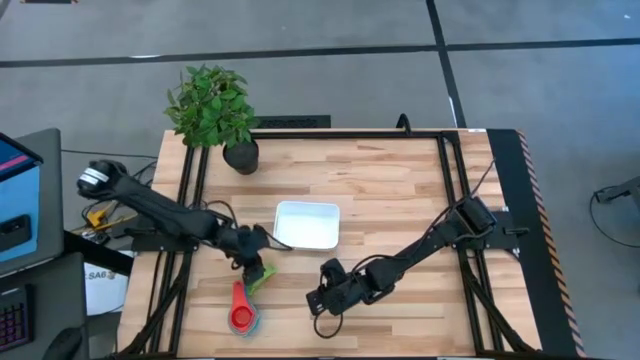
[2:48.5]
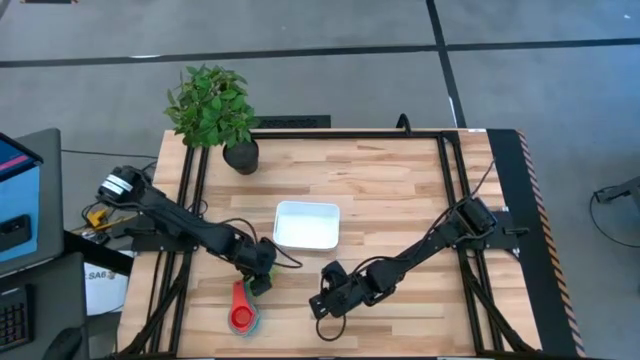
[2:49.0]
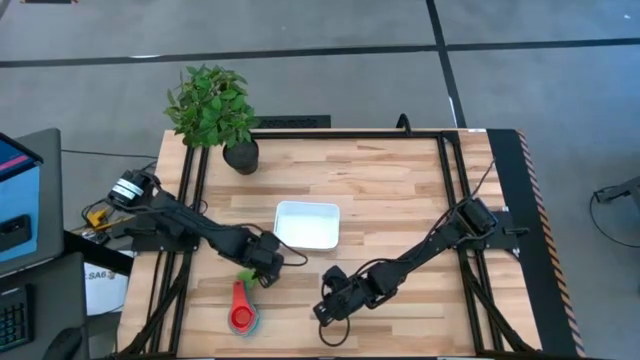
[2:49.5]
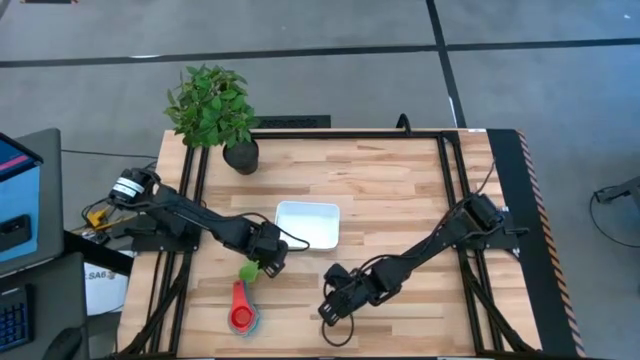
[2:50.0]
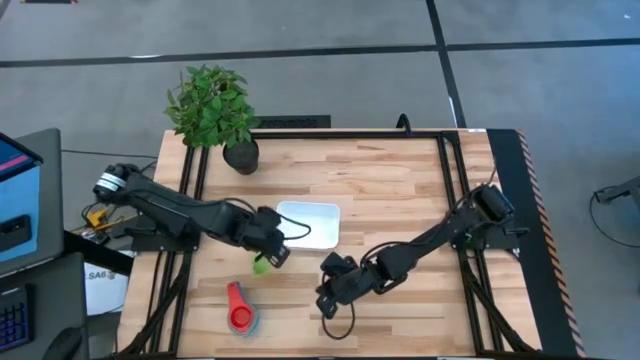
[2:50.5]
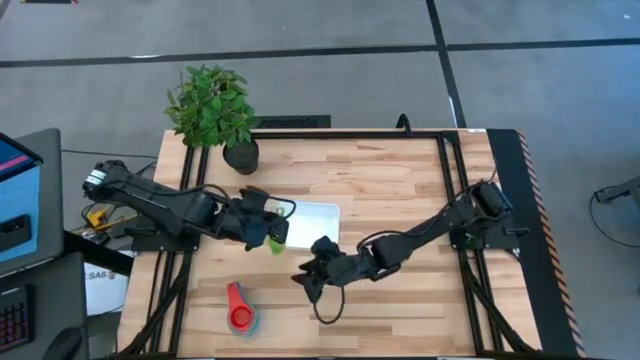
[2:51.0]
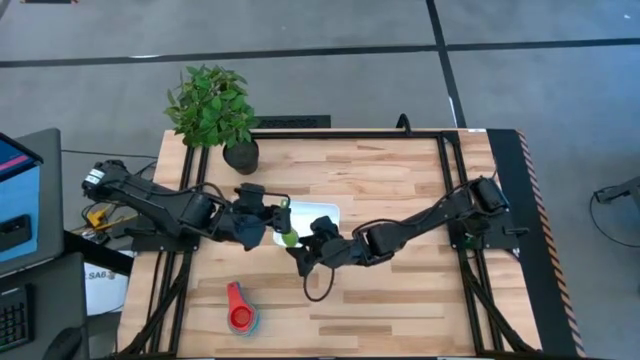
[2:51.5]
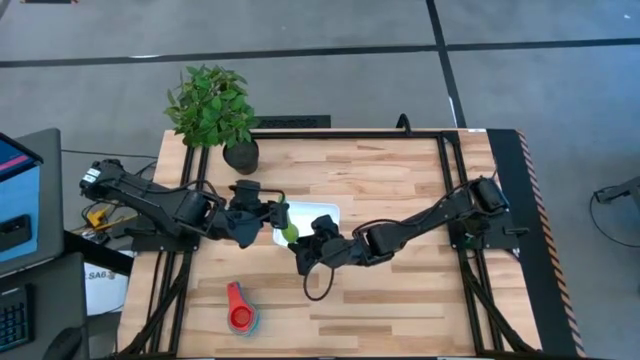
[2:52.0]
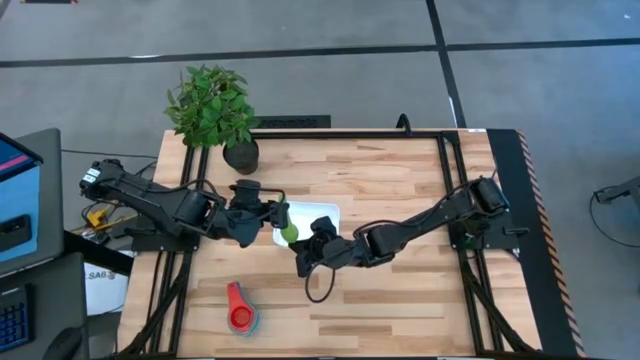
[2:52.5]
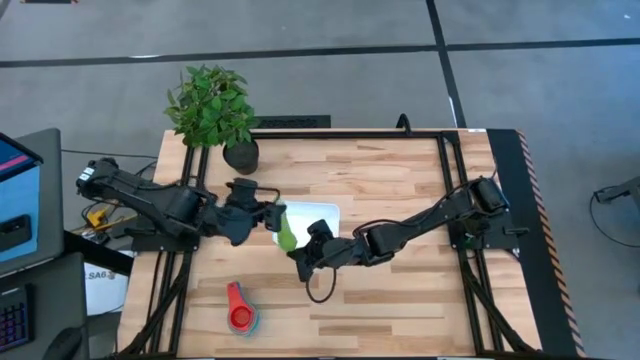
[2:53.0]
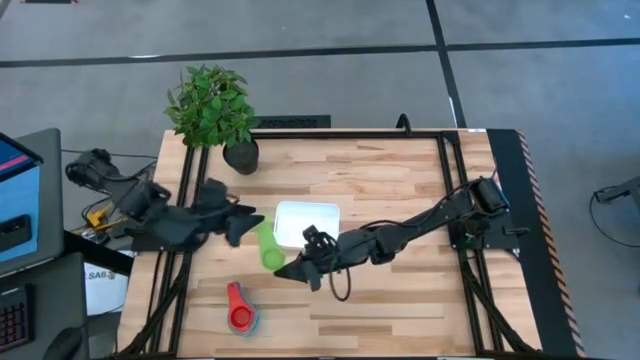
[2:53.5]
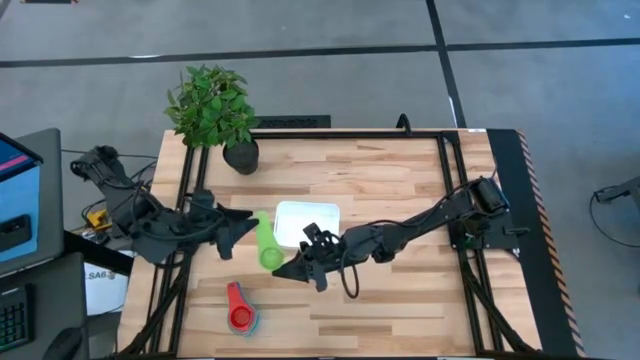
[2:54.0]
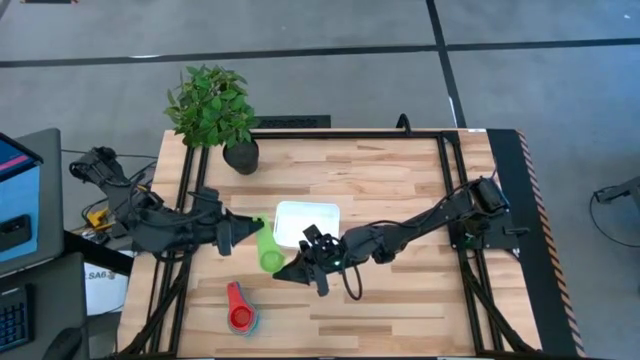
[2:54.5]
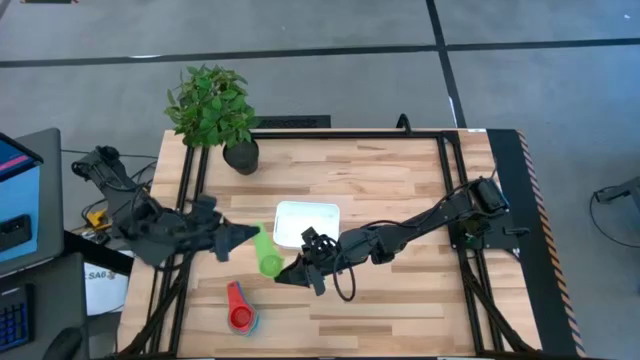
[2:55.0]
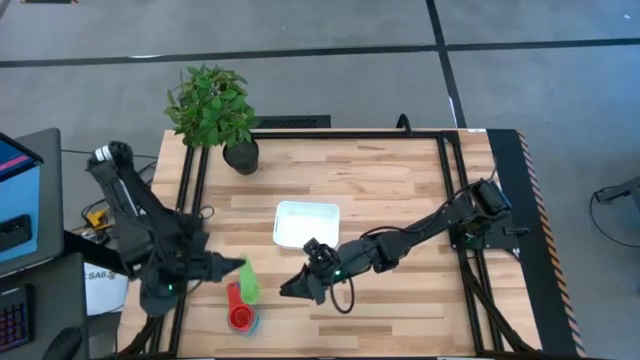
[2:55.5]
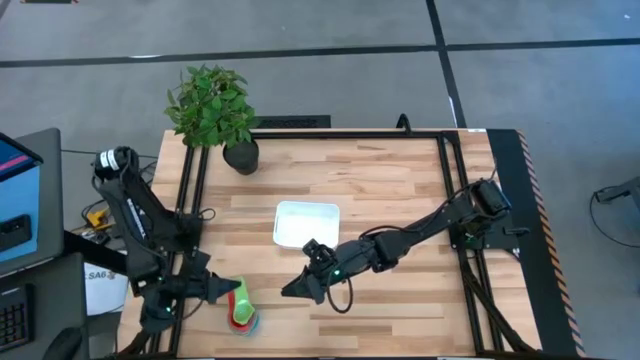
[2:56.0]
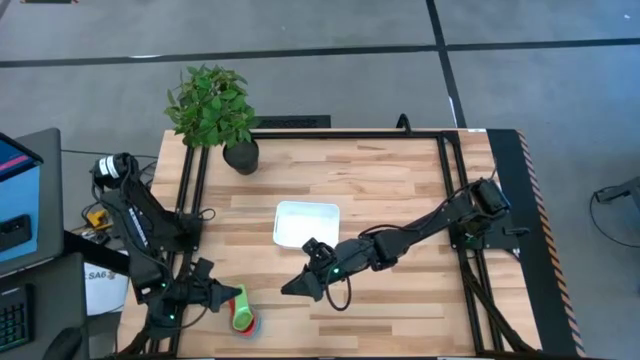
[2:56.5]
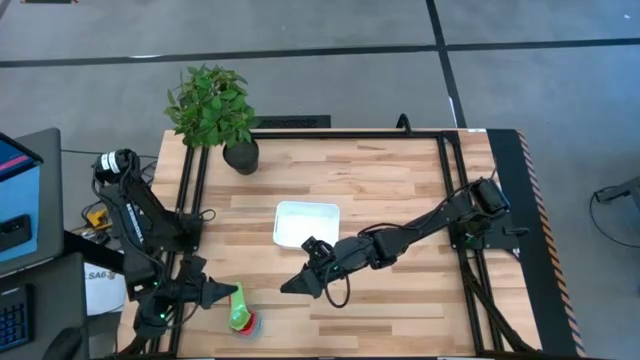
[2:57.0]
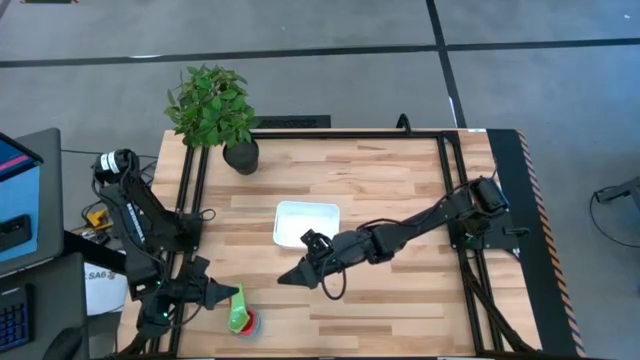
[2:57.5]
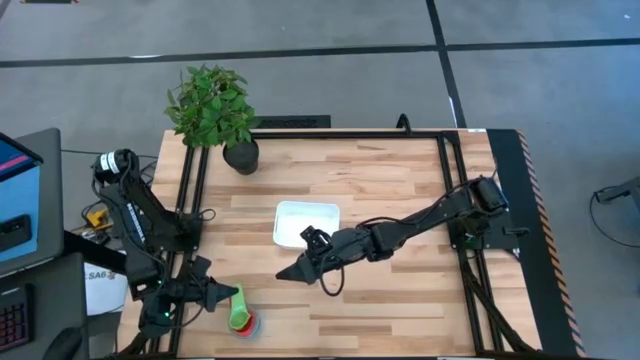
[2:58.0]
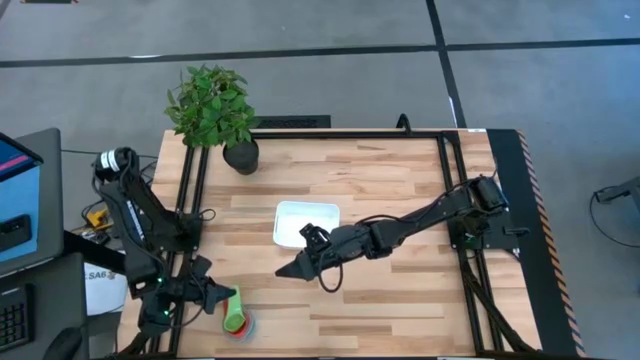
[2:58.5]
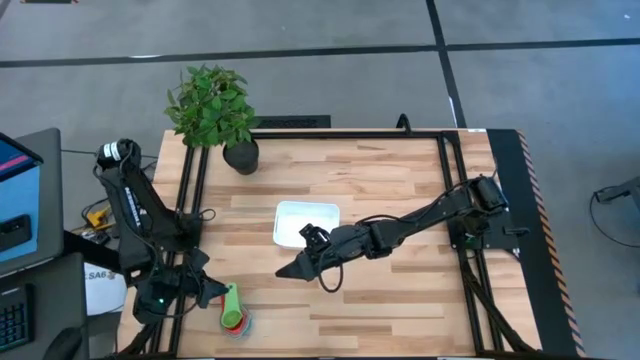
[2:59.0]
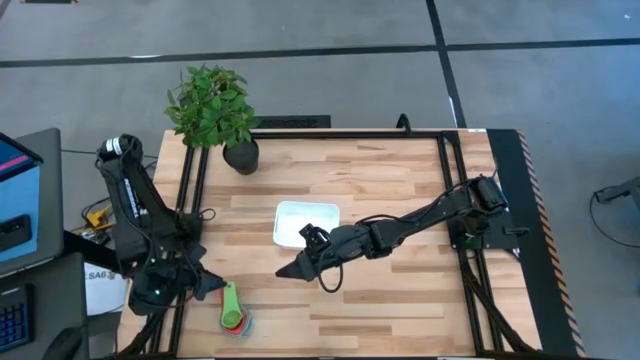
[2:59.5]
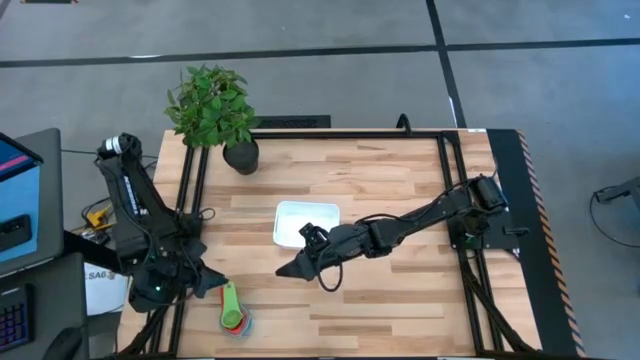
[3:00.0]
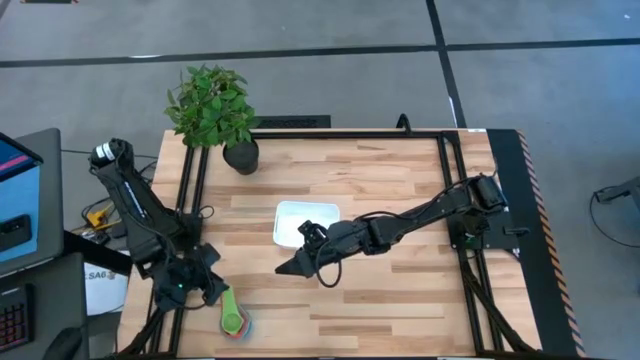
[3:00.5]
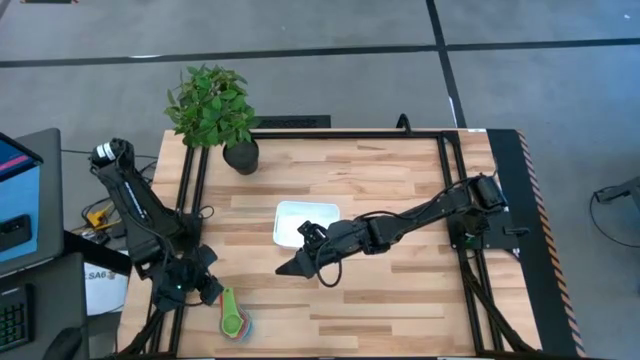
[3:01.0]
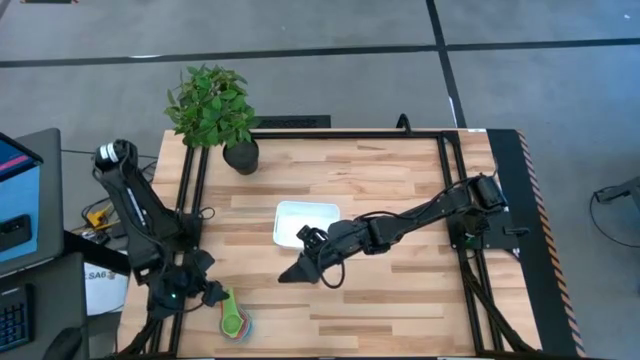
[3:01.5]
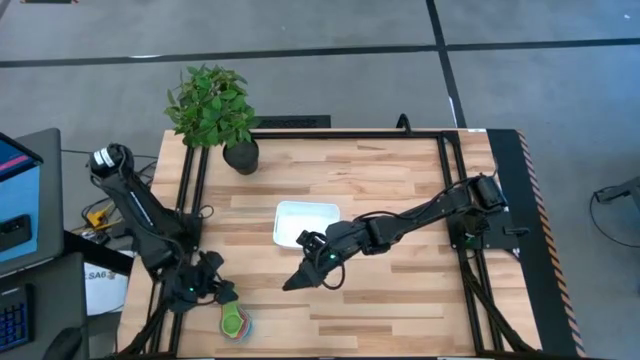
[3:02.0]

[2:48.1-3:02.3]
Task: Nest measuring cups in basket
Stack the green measuring cup into the red measuring cup

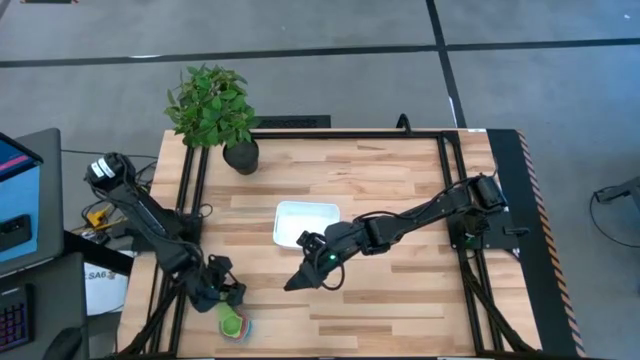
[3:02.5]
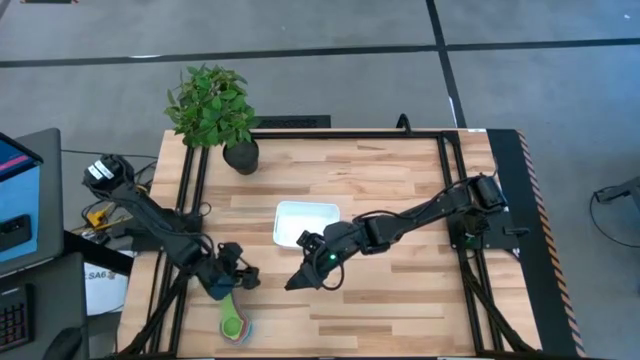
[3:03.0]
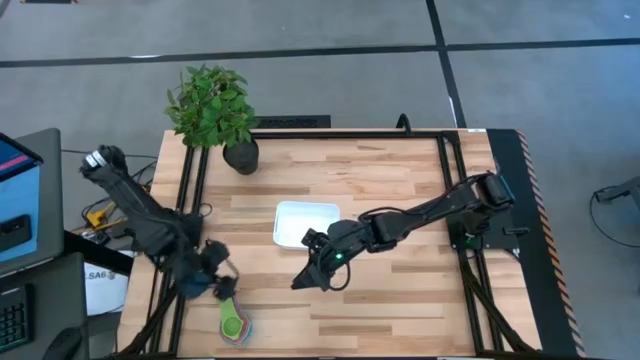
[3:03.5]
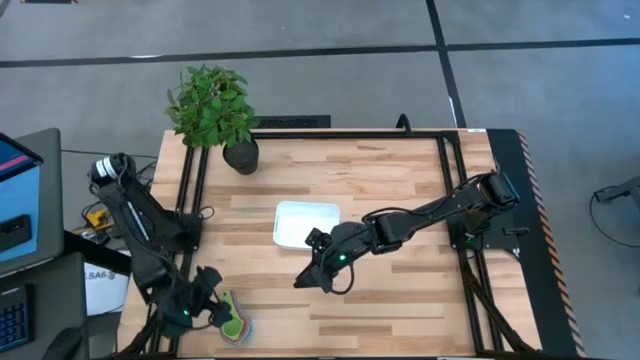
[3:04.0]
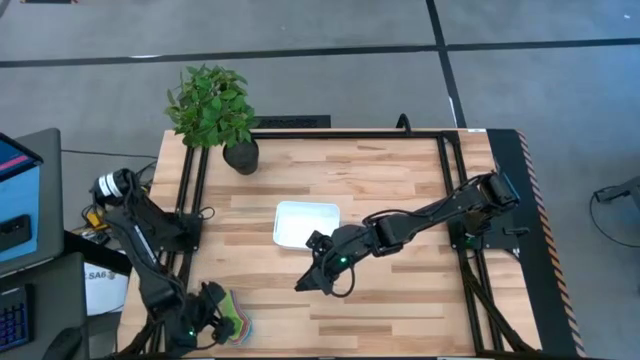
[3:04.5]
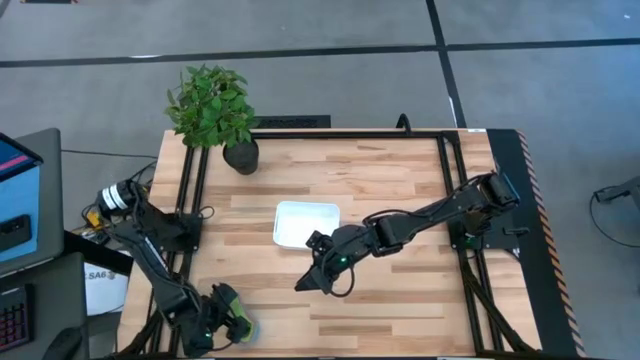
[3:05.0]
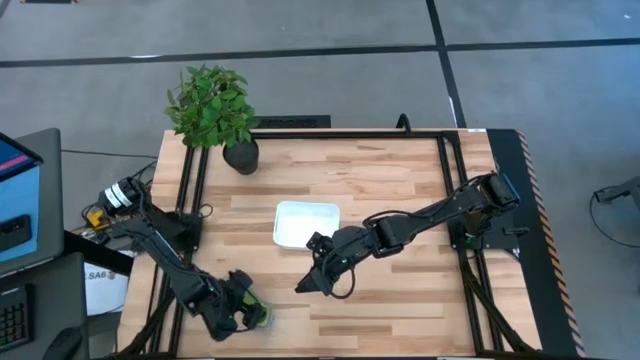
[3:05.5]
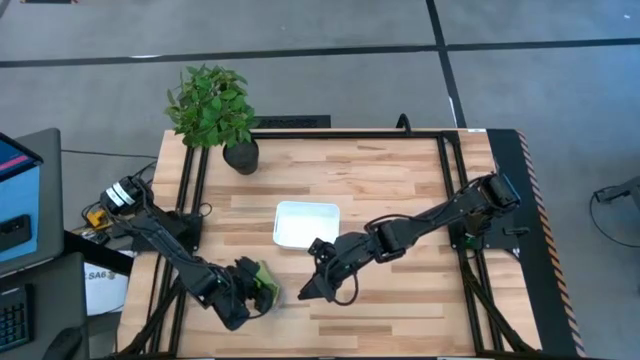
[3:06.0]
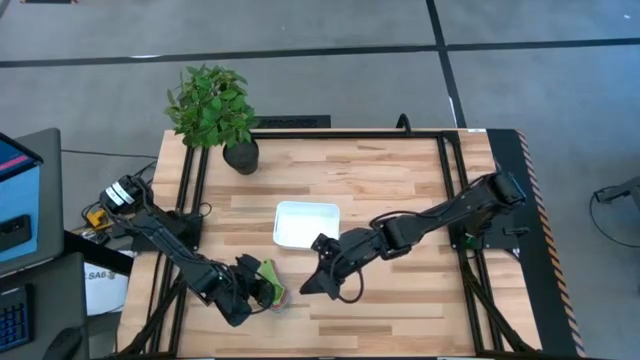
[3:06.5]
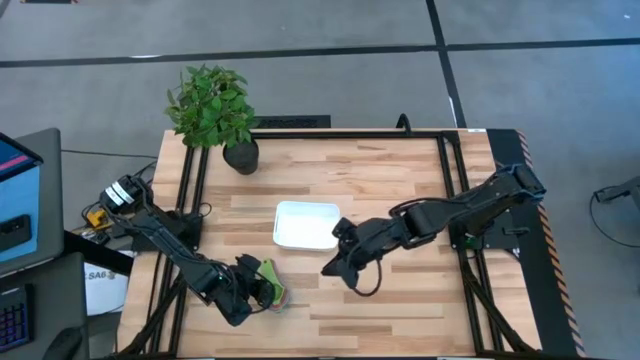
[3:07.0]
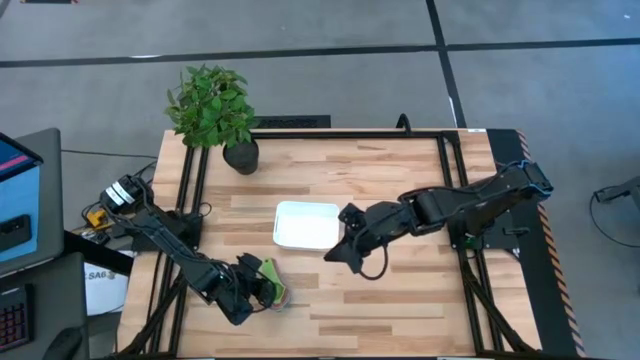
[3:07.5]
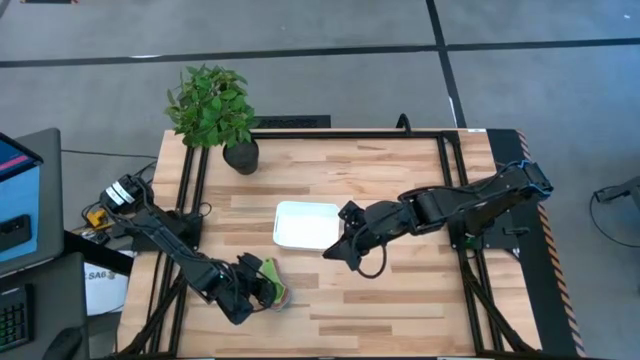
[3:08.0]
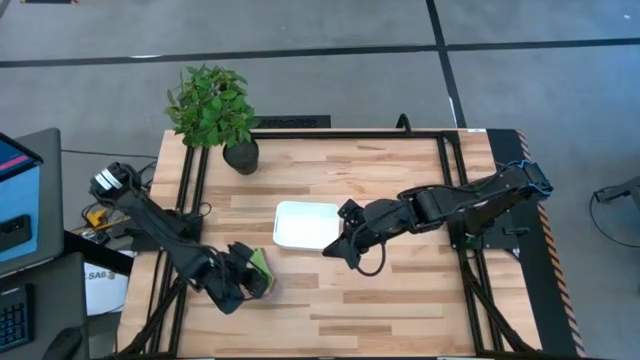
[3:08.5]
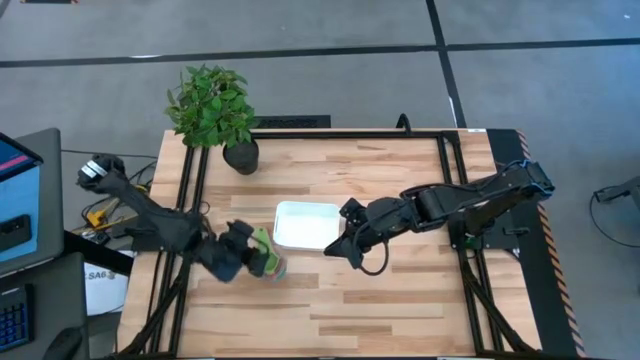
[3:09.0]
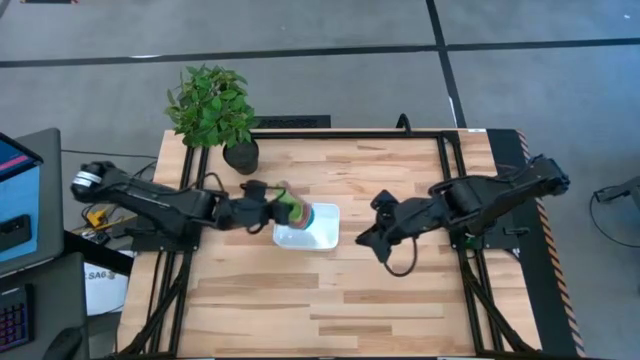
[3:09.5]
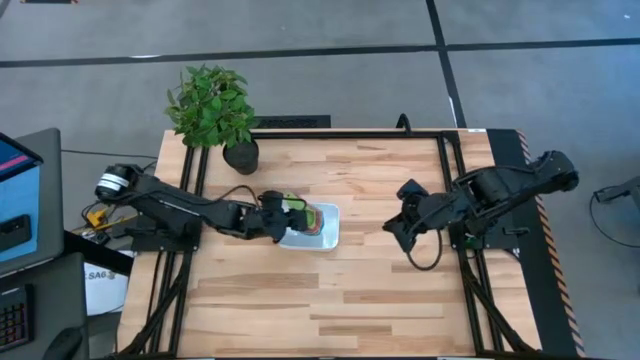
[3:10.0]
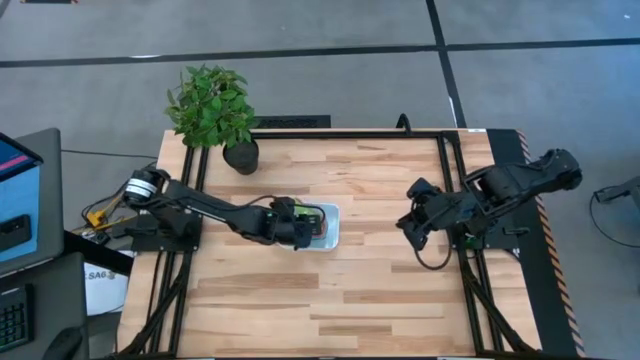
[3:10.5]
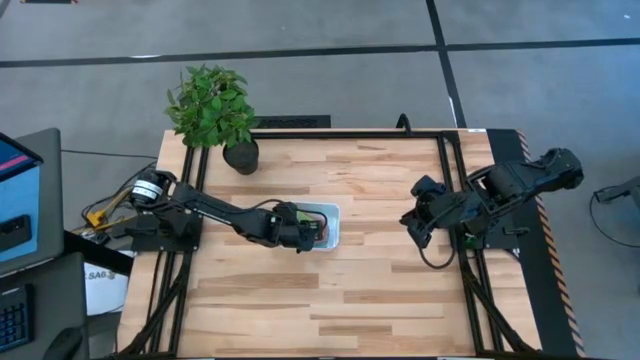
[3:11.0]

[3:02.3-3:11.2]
Put the measuring cups into the white bin
